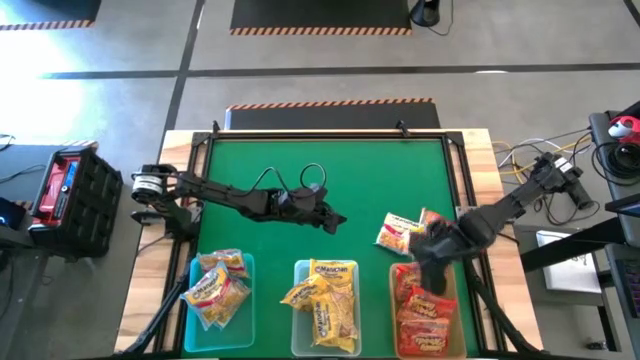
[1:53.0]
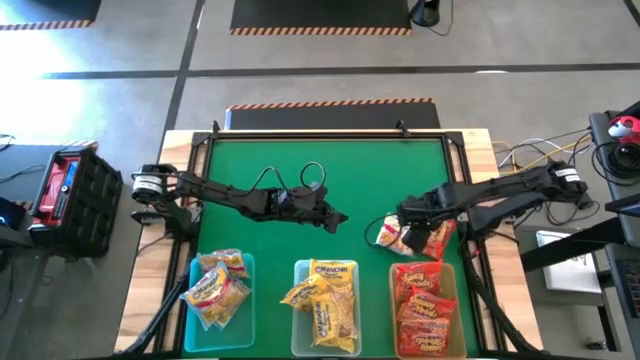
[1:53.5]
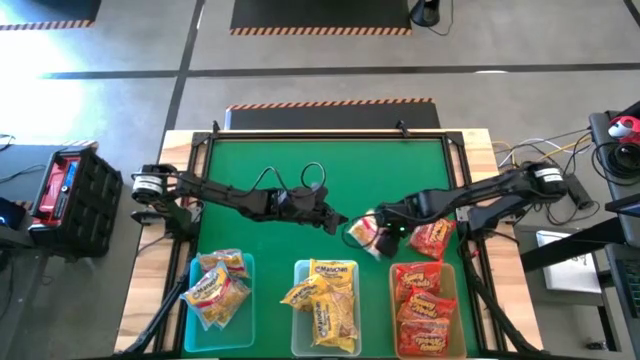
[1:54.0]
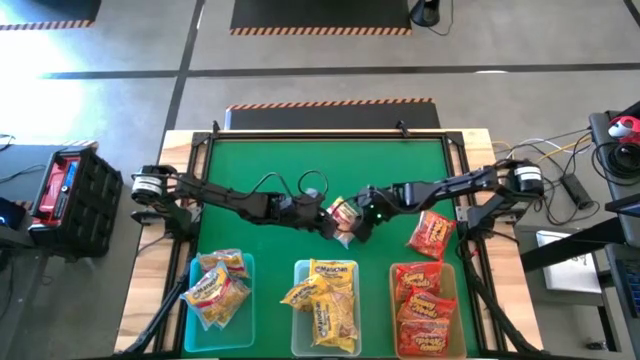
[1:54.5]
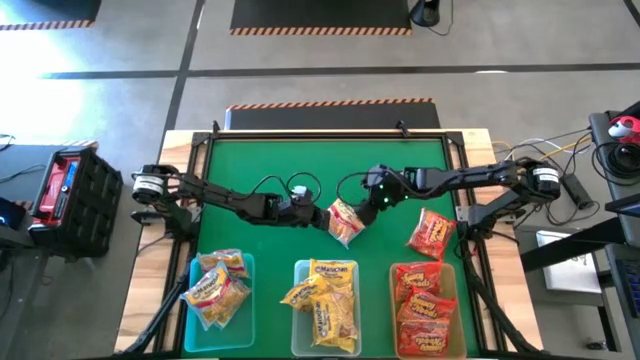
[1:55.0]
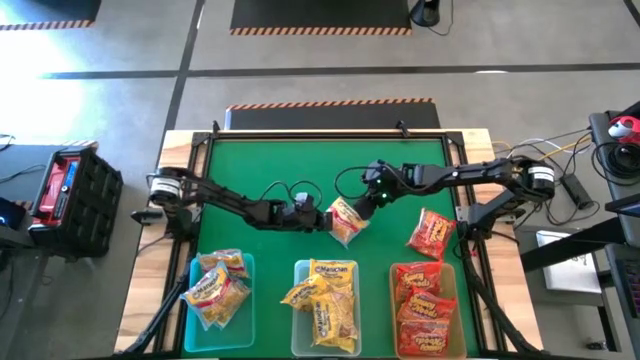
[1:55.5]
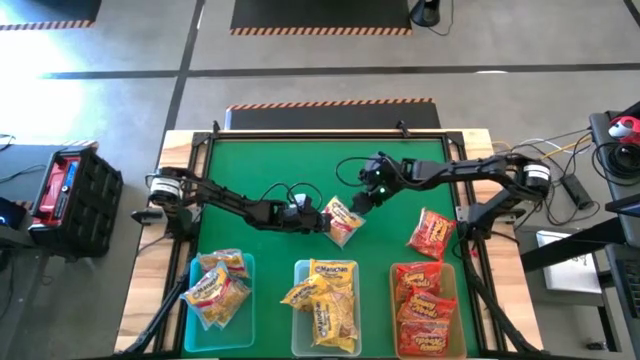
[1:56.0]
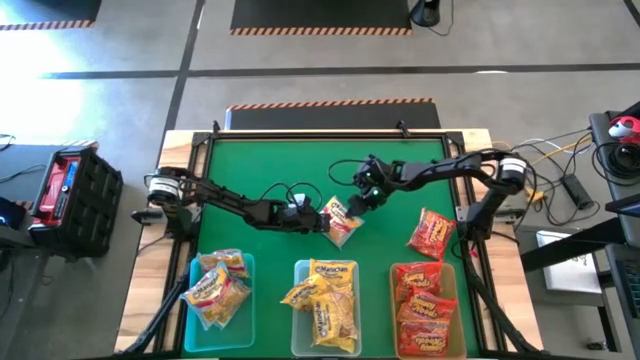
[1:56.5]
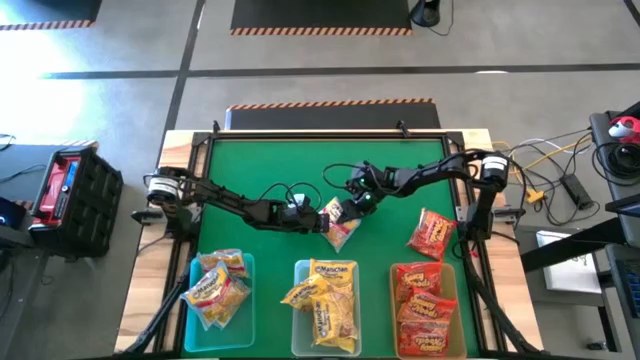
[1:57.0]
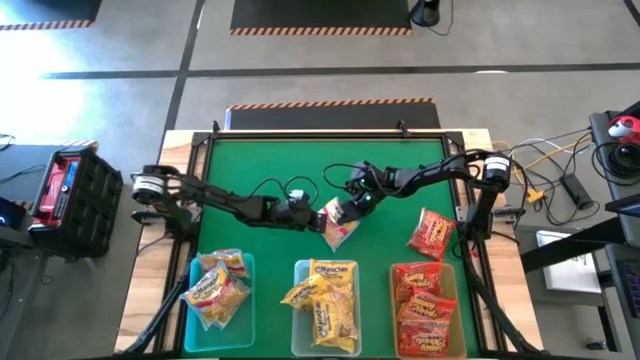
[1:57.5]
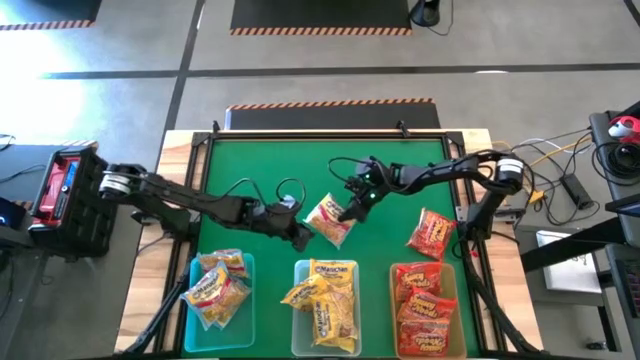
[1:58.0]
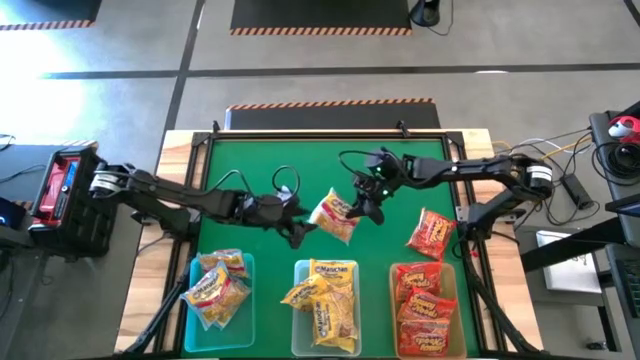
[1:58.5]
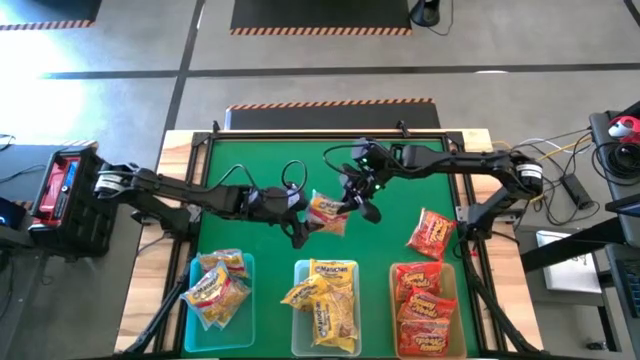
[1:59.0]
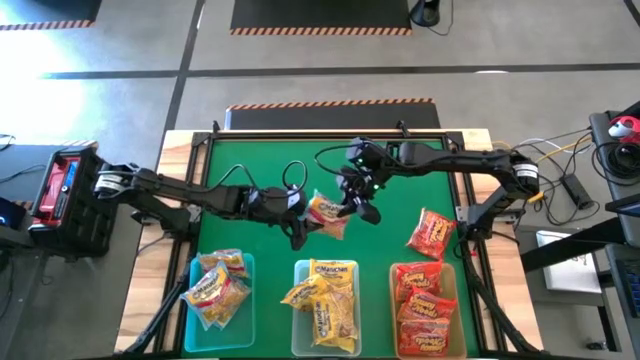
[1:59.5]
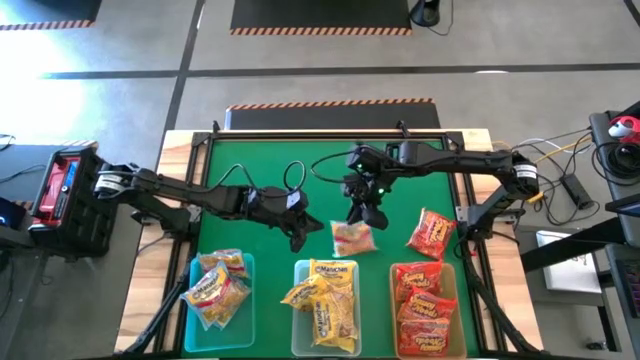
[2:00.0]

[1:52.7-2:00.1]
Task: Sort Maruchan noodles
Put the blue noodle pack into the blue bin

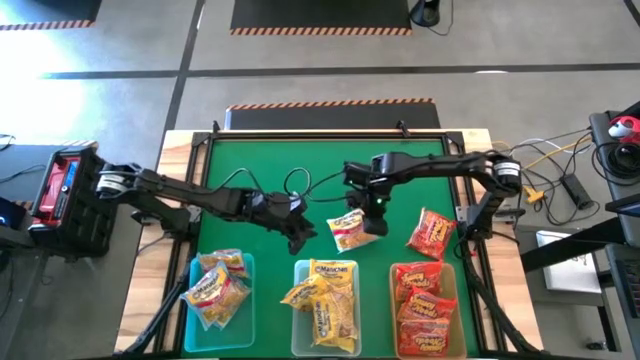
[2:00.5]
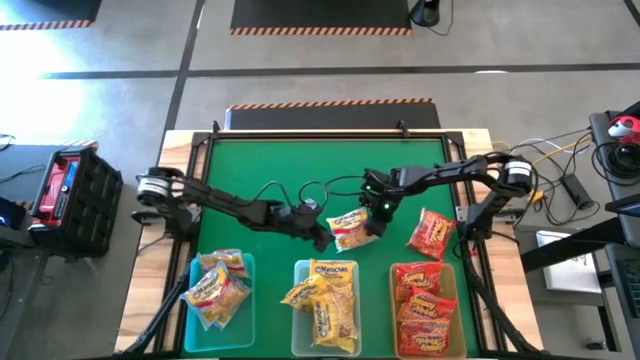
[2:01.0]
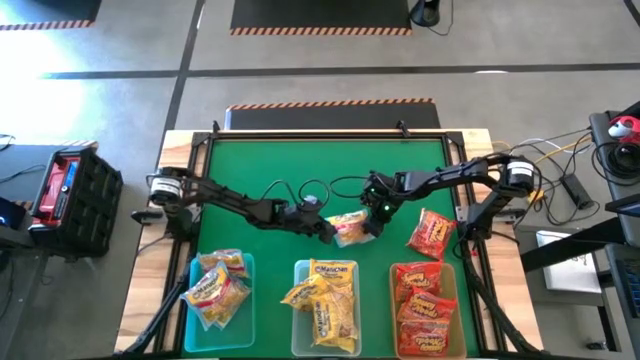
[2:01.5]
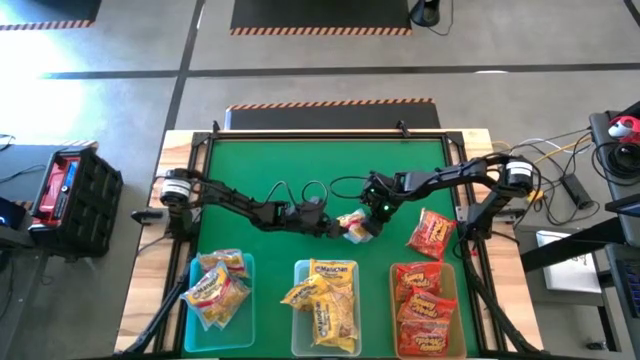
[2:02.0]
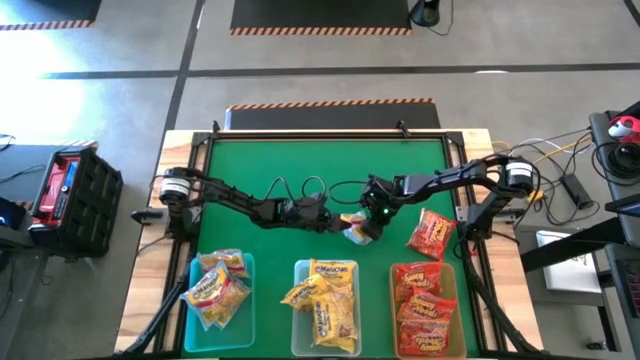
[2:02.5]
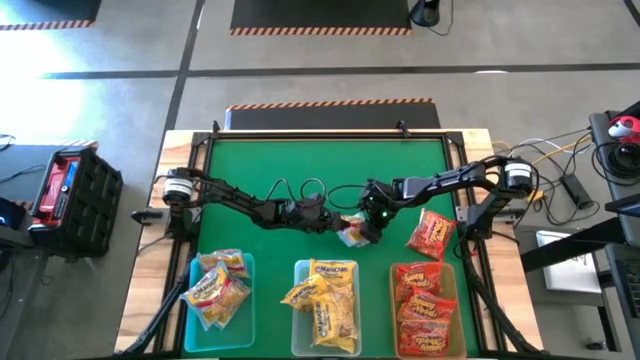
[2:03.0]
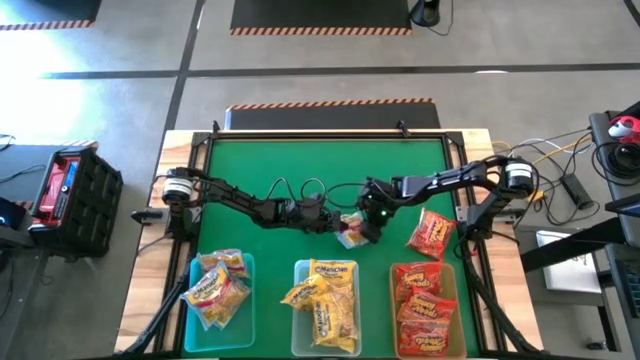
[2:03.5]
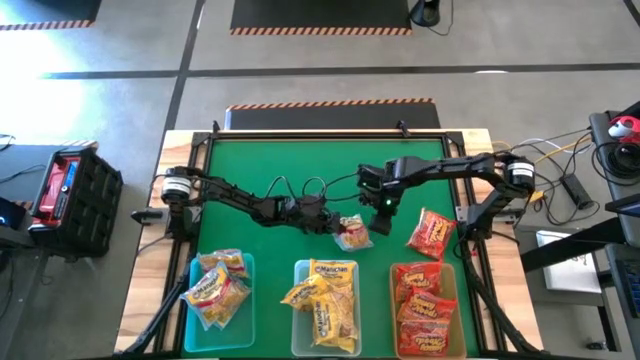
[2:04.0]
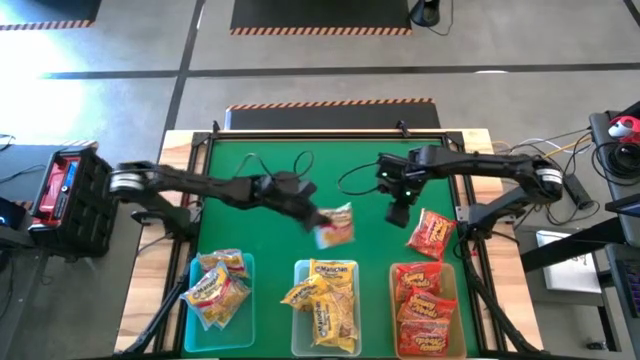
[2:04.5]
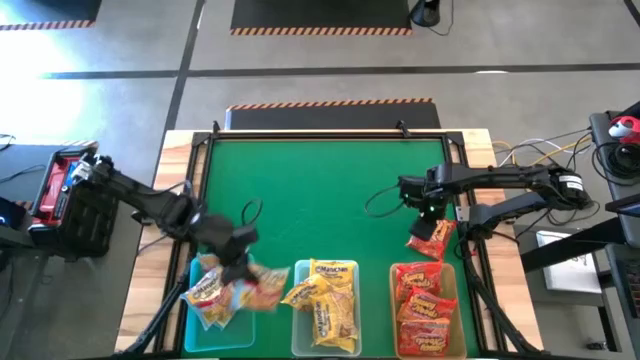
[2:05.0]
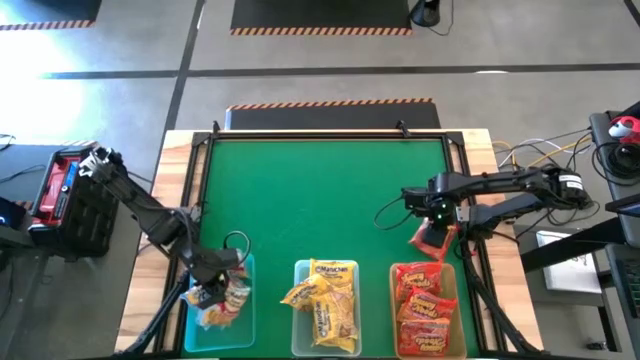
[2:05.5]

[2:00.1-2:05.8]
Put the blue noodle pack into the blue bin

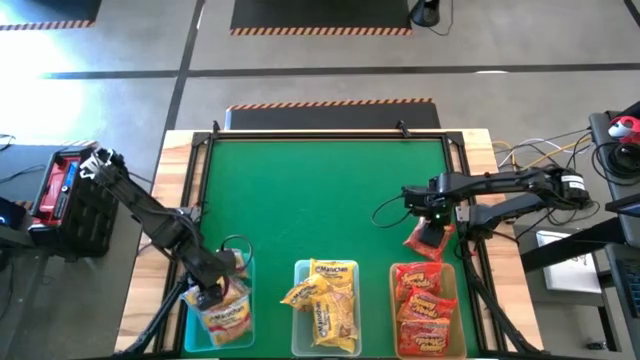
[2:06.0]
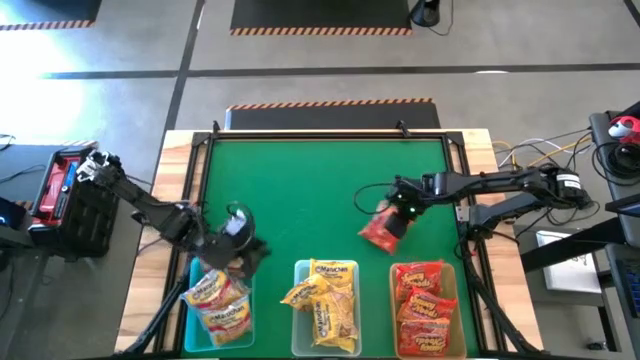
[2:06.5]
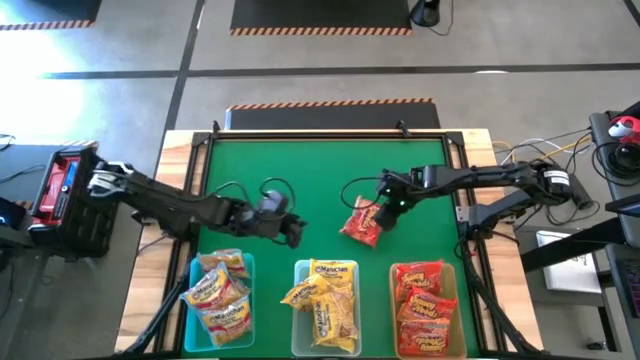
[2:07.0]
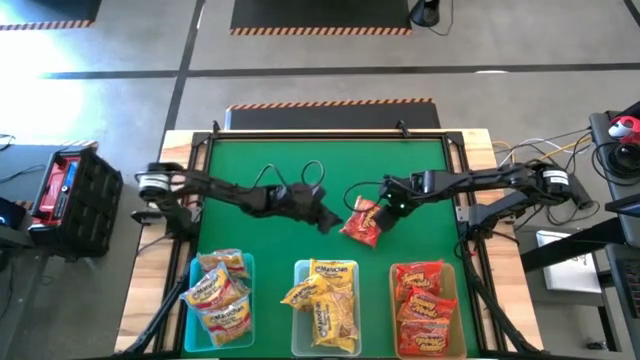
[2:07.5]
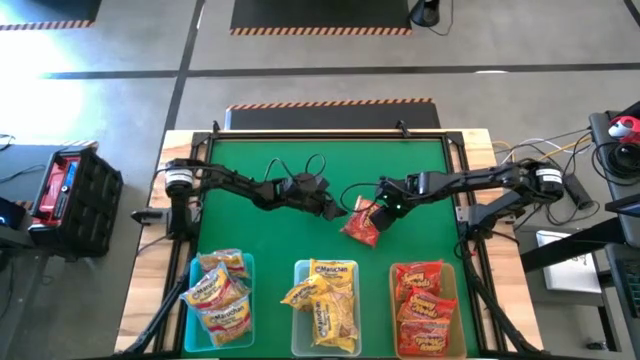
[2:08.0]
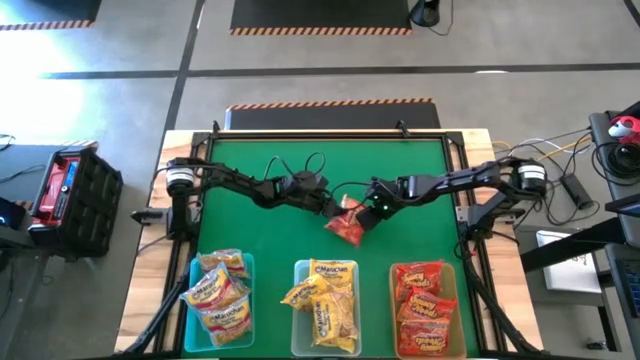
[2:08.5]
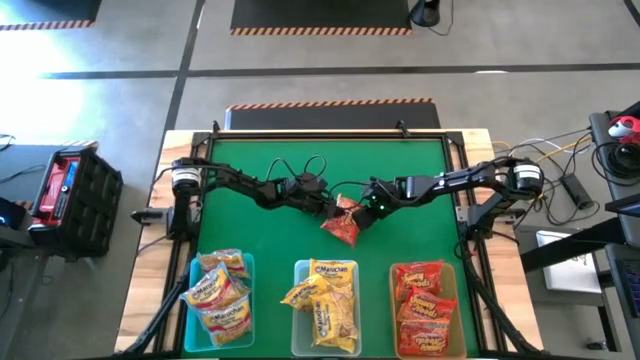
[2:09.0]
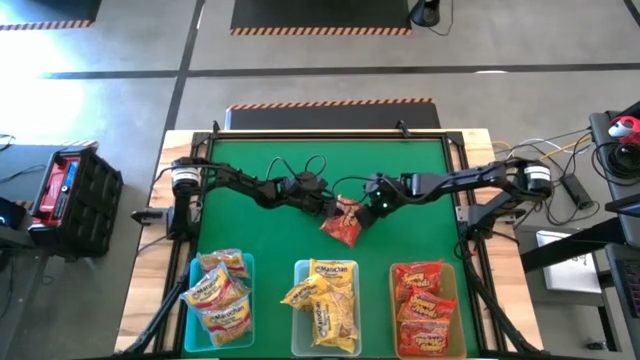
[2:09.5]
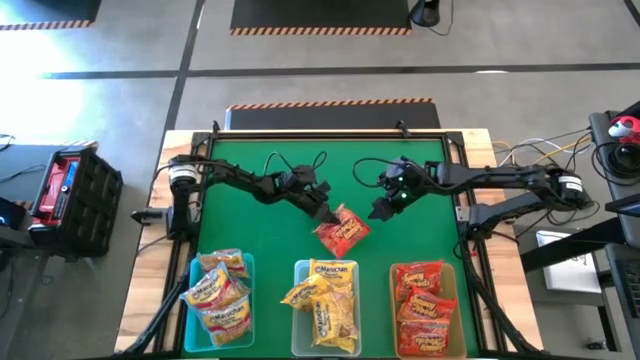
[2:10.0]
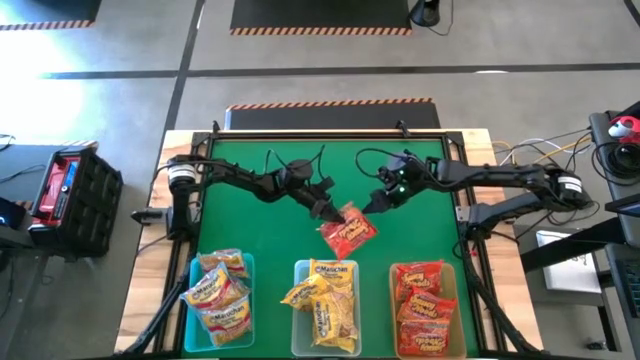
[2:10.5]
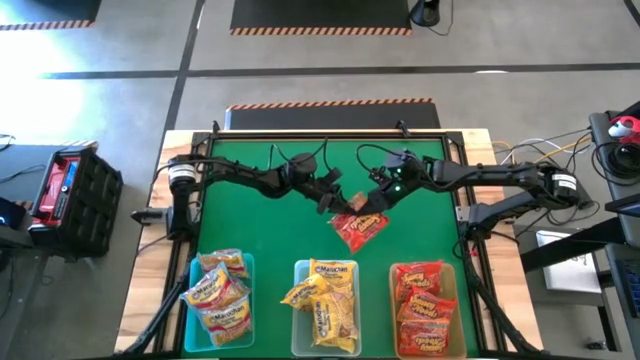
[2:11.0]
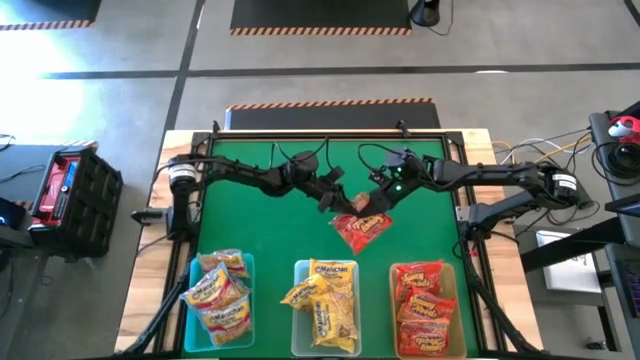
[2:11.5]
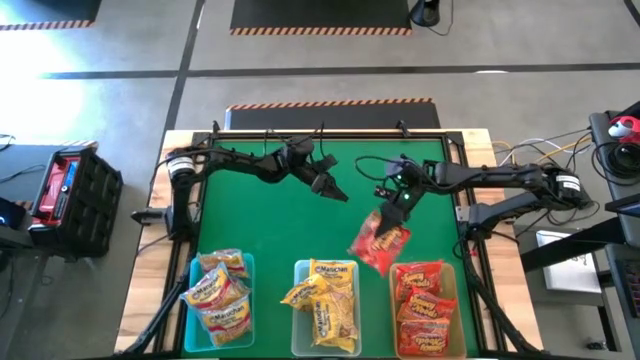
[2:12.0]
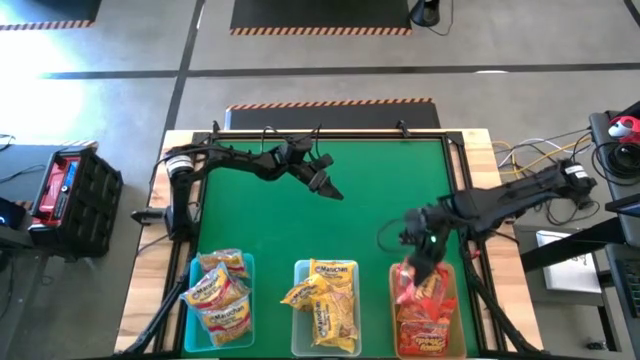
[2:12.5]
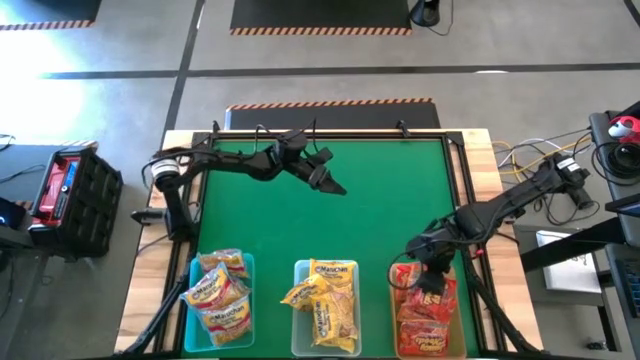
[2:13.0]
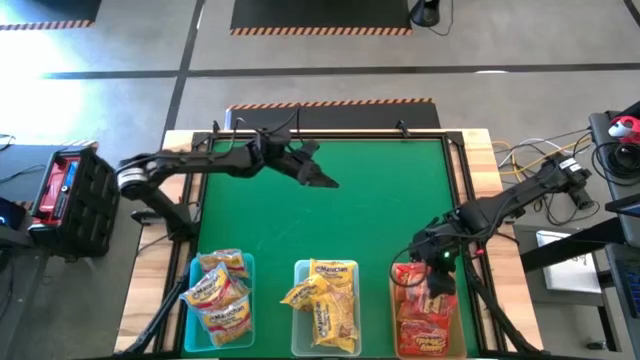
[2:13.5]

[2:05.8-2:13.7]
Put the orange noodle pack into the orange bin
